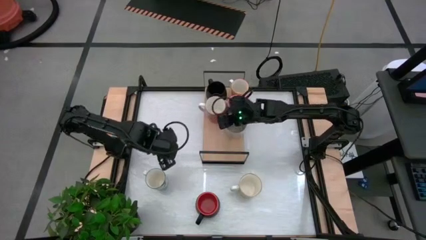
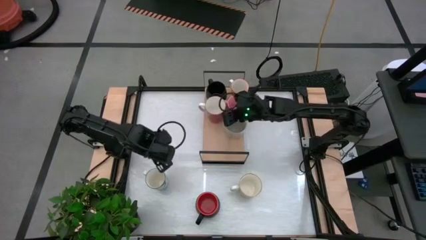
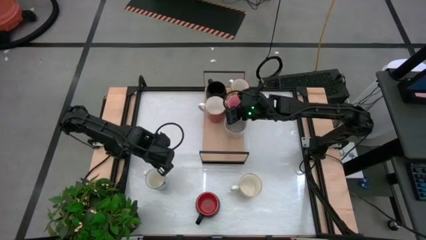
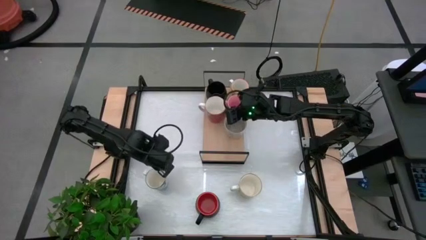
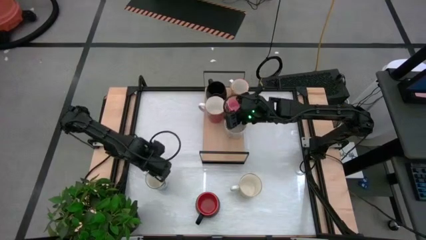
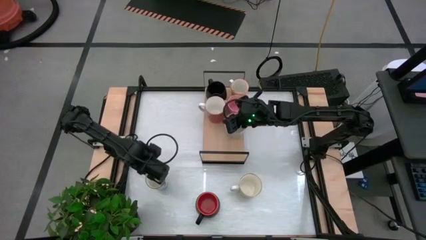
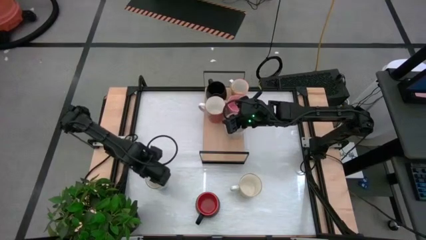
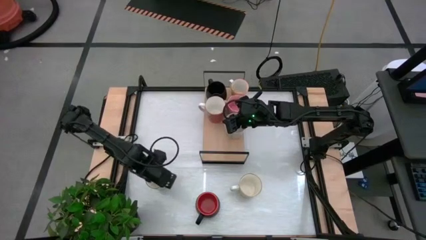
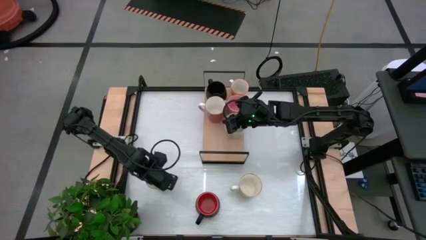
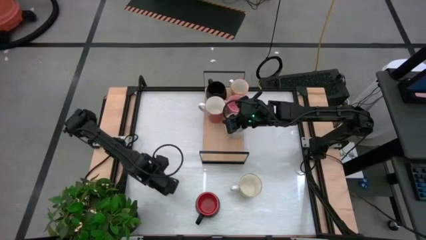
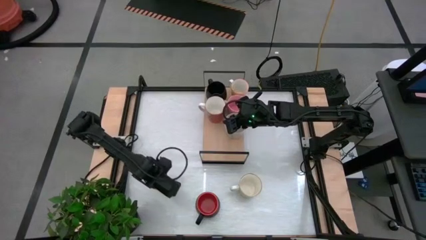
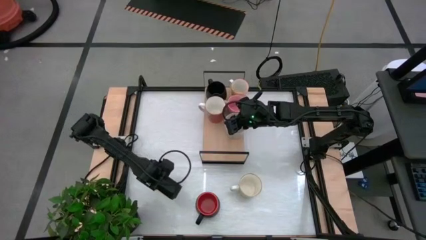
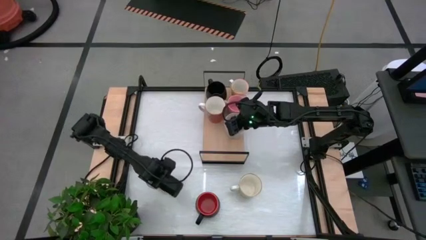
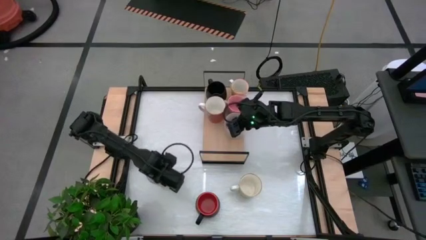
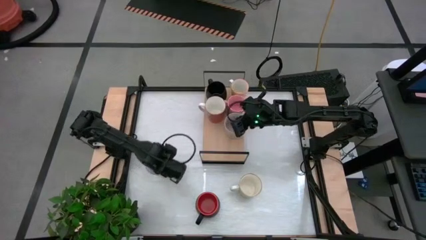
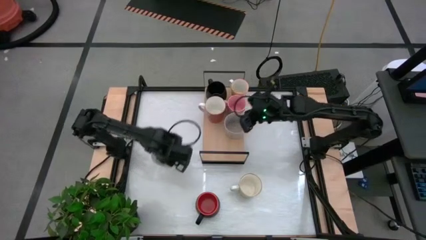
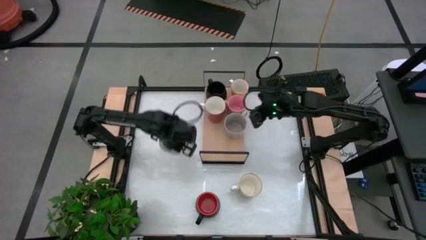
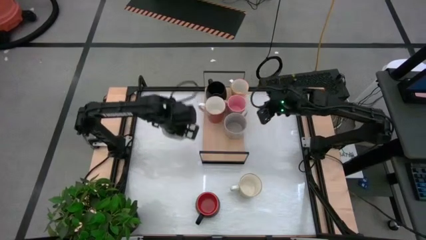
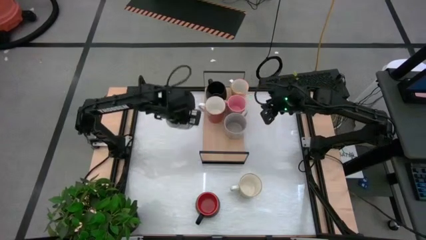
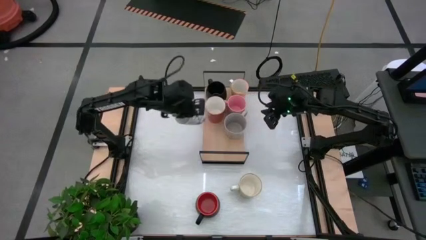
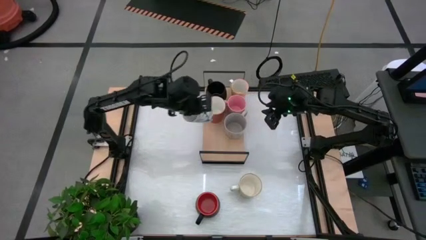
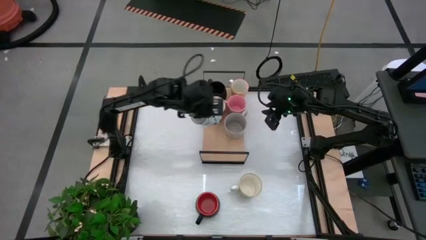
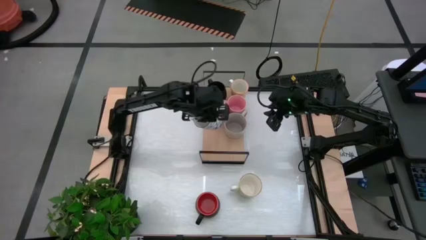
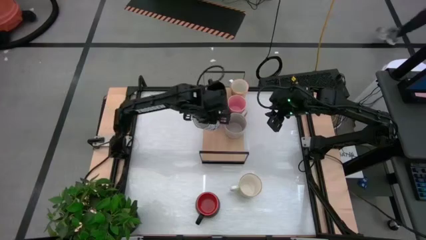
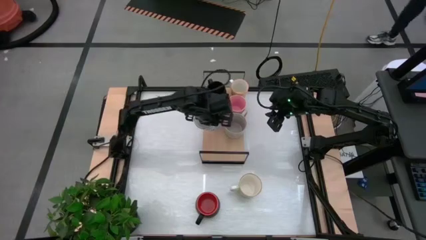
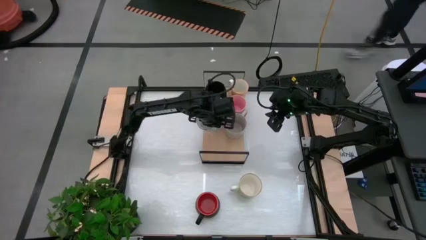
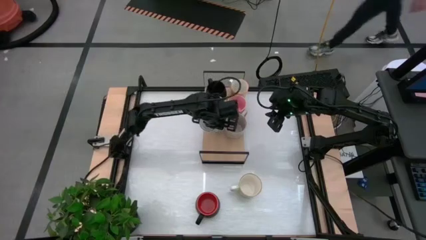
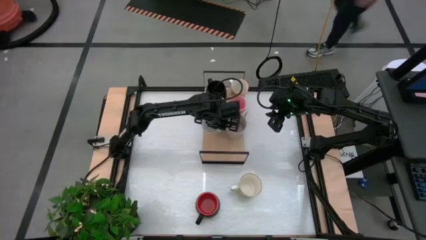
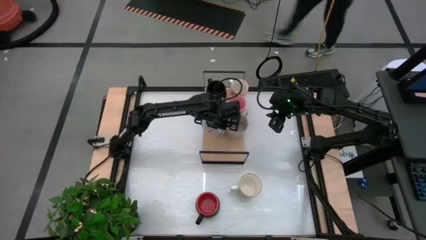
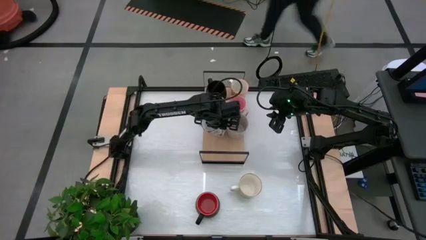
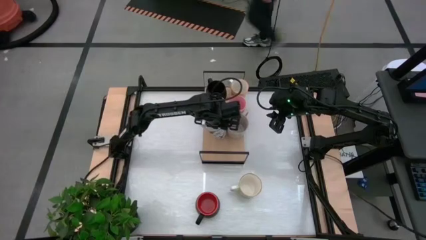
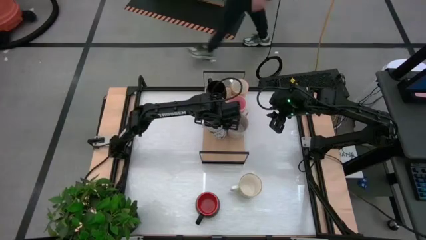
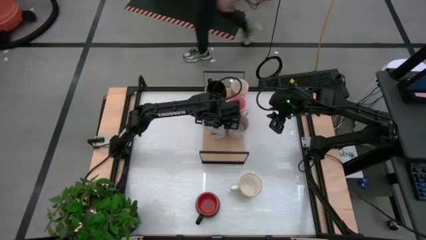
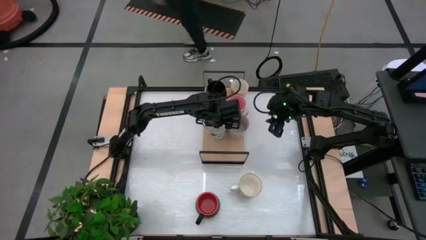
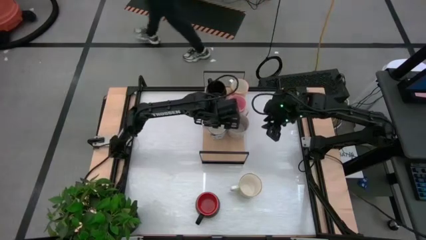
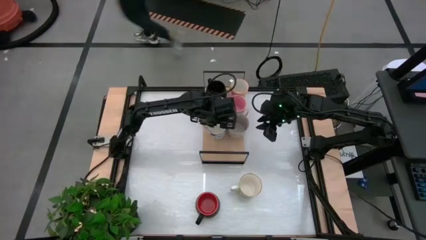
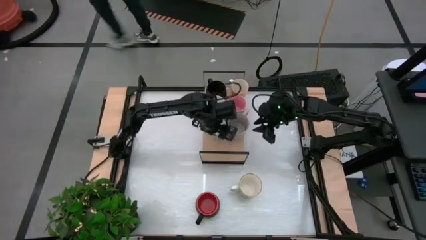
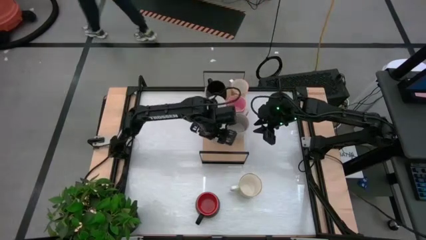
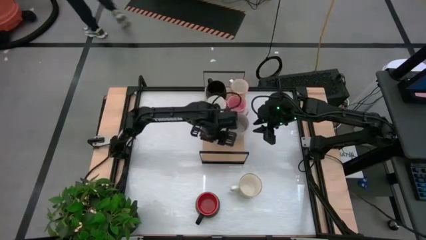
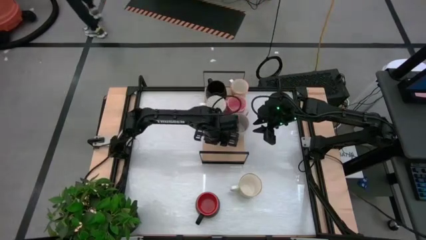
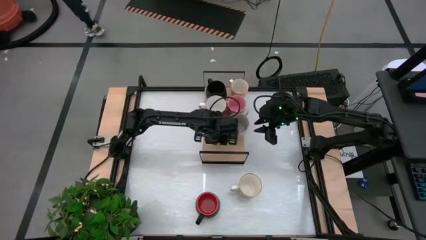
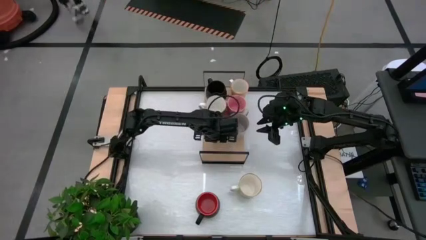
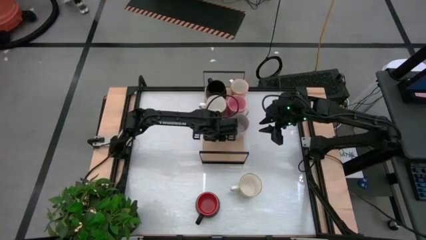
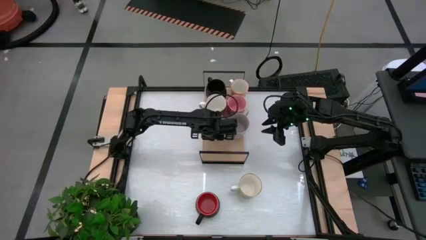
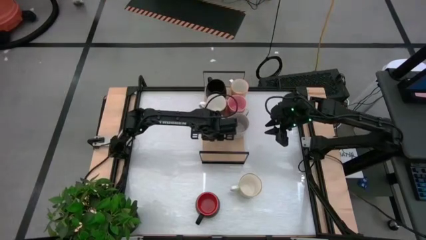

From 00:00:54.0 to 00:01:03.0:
Task: Place coffee mugs
Put the blue pattern mug on the shelf

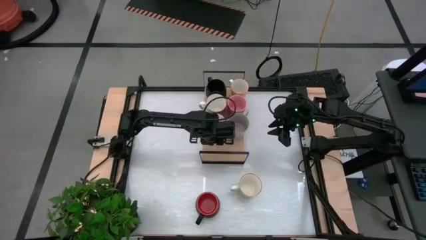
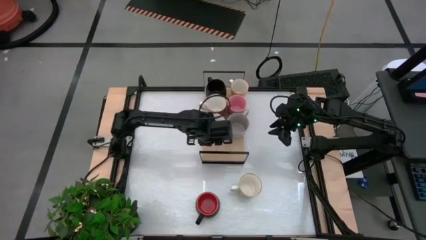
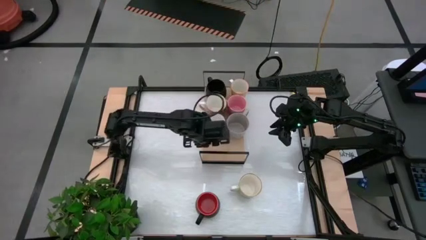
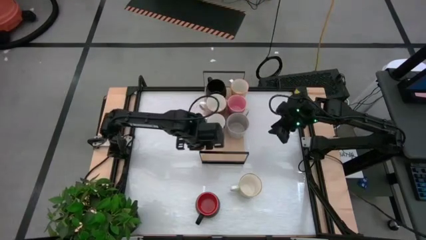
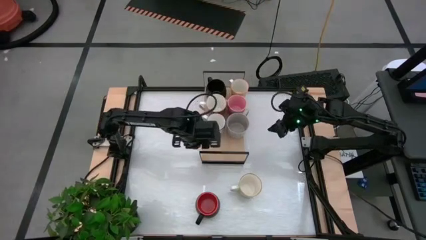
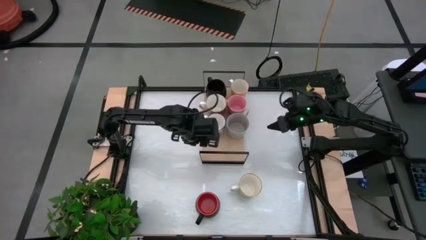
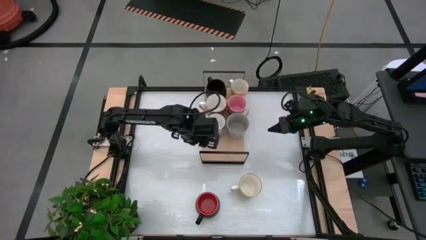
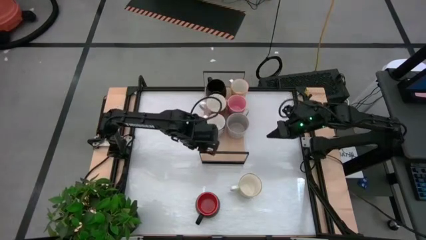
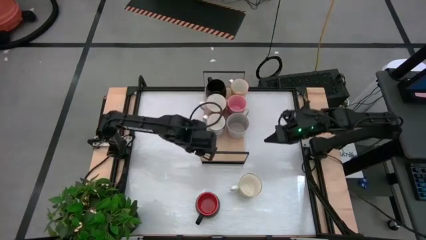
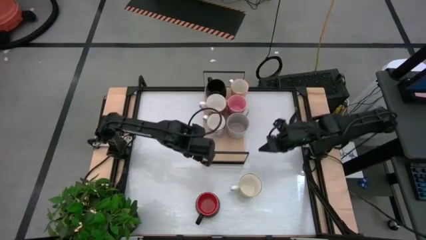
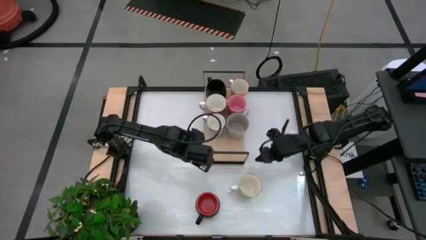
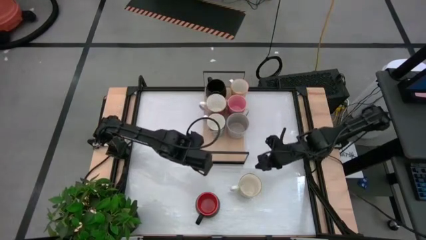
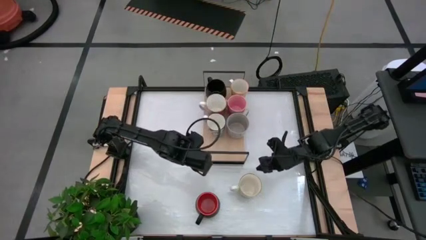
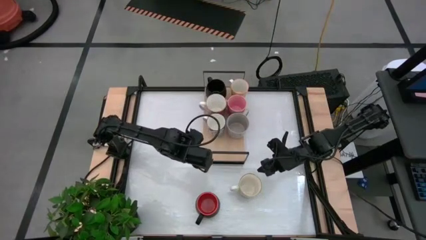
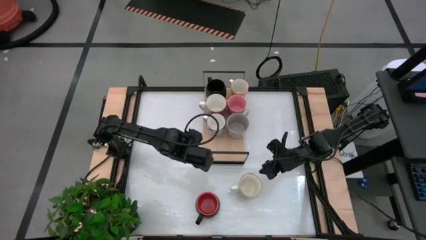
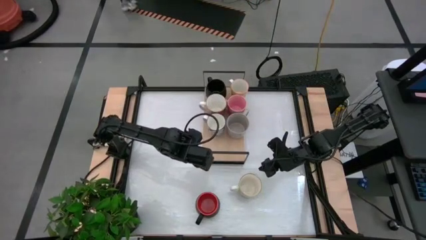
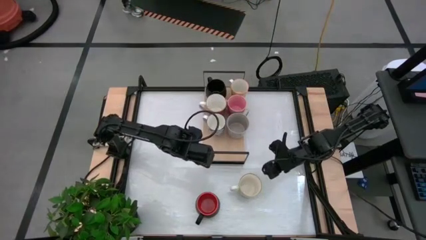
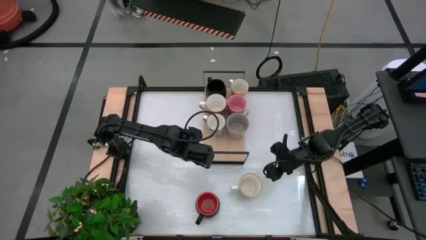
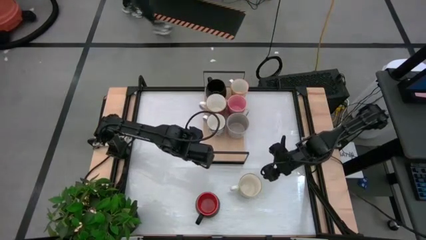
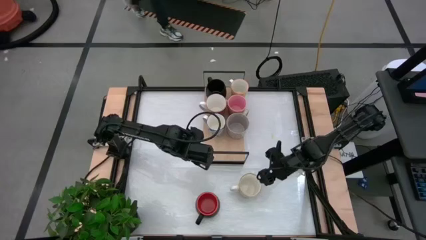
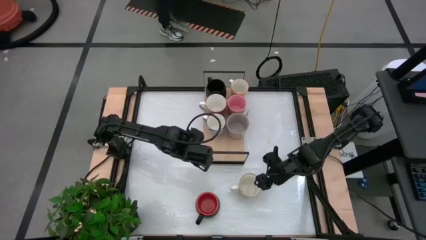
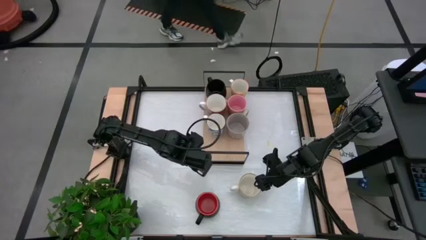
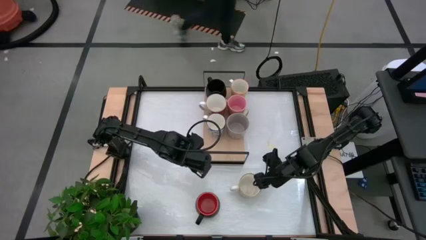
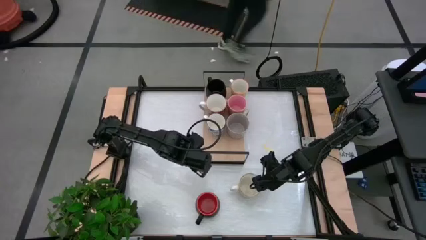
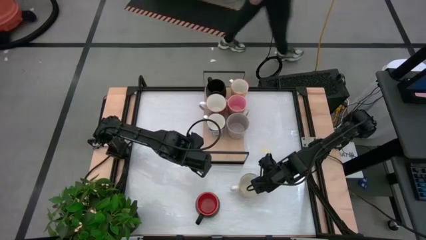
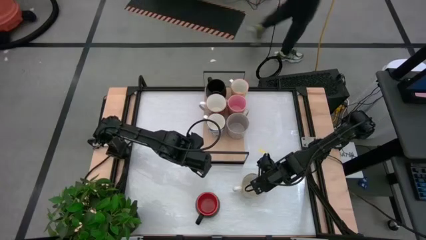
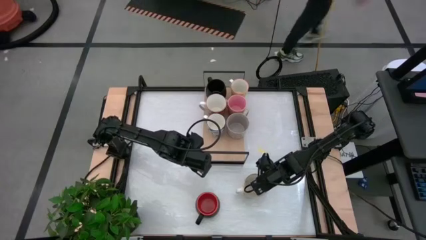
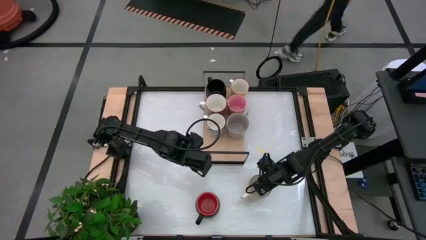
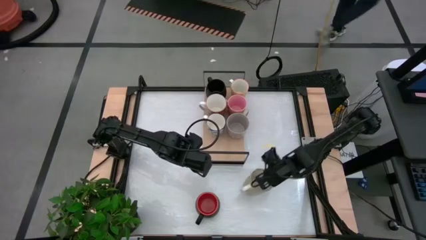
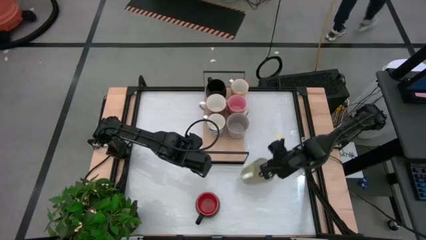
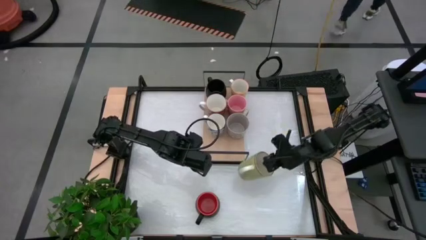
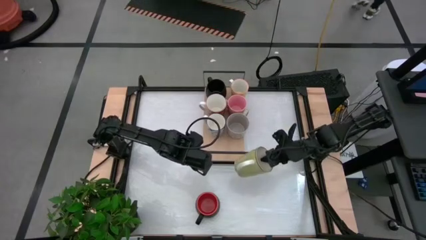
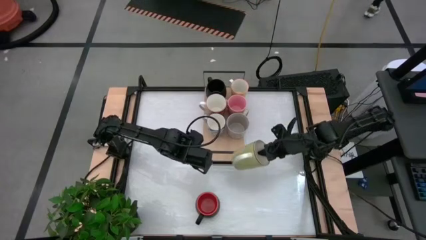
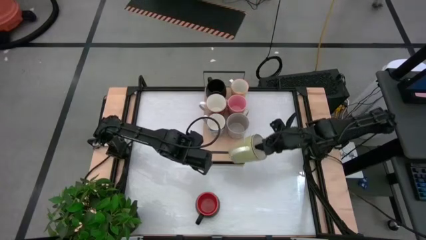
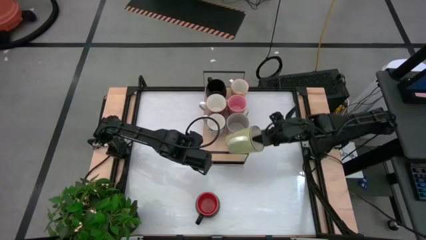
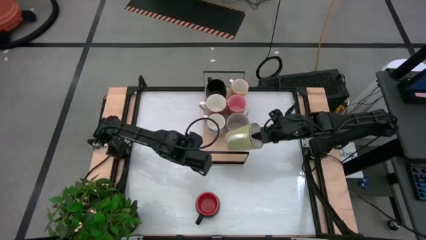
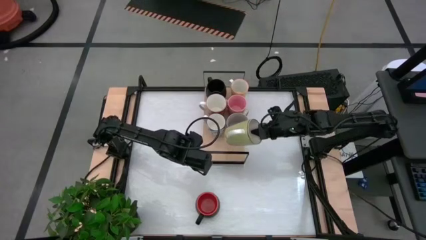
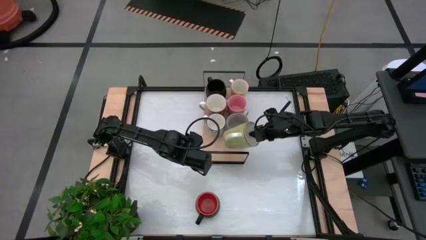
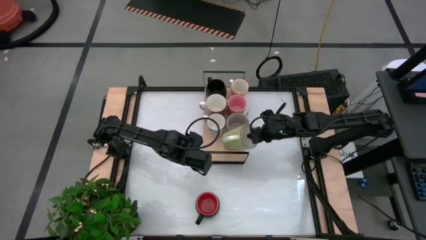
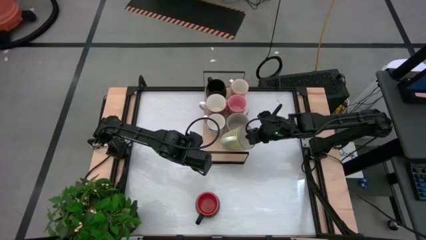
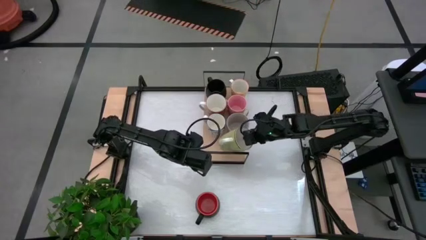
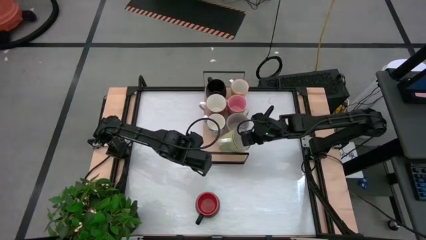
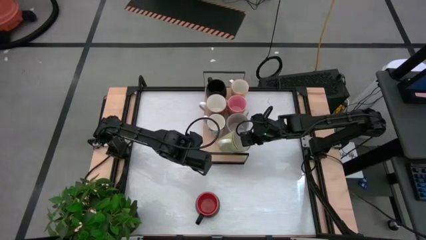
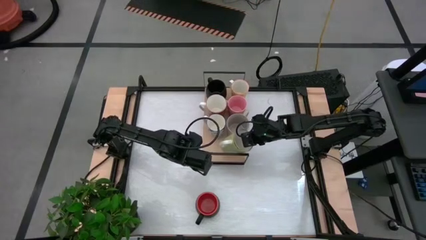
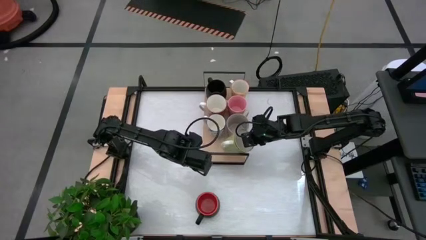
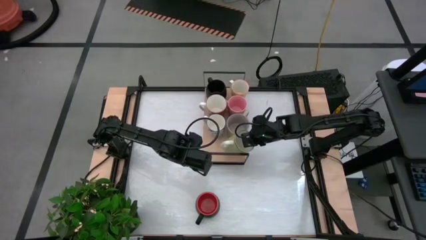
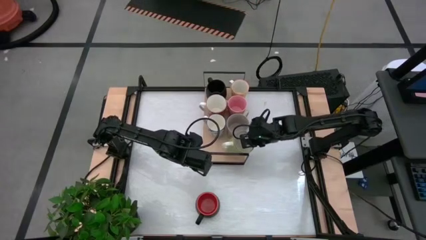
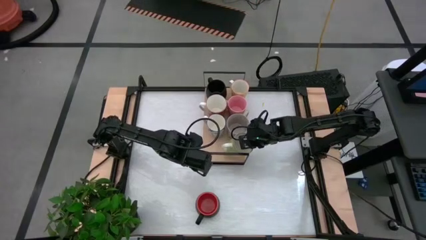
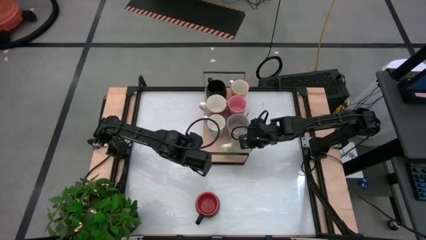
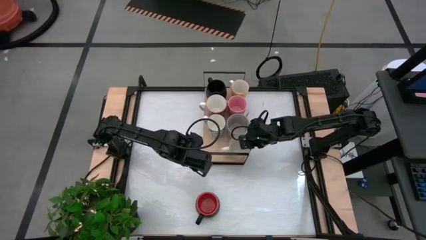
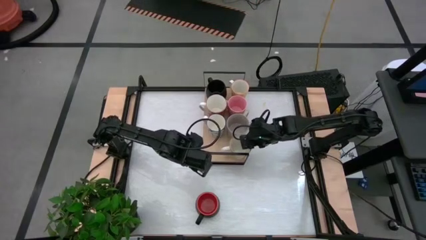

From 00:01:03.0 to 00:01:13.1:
Put the green mug on the shelf
